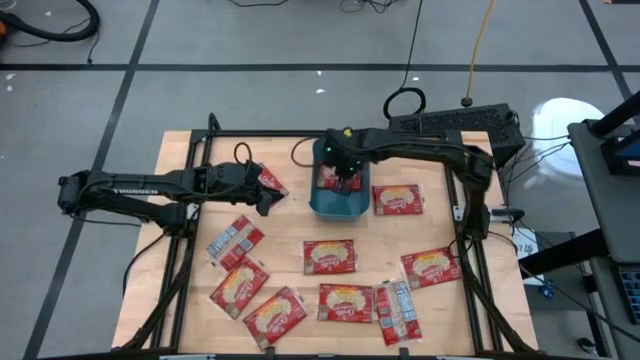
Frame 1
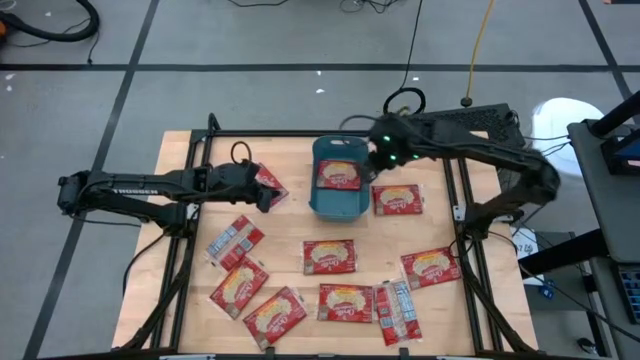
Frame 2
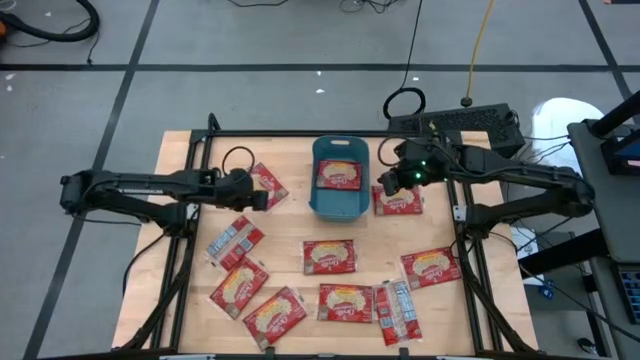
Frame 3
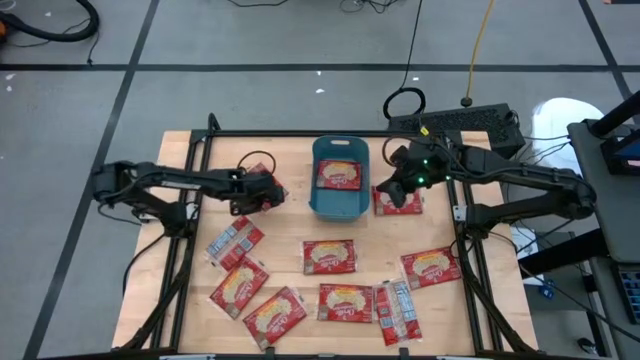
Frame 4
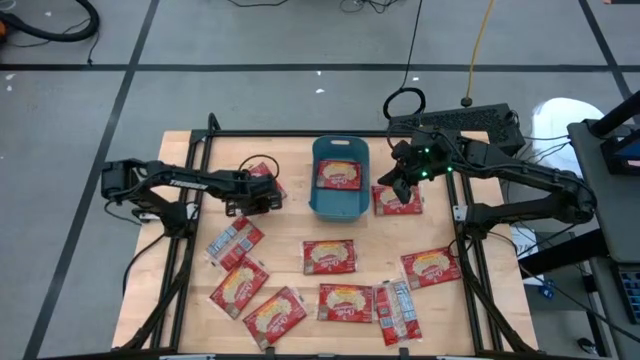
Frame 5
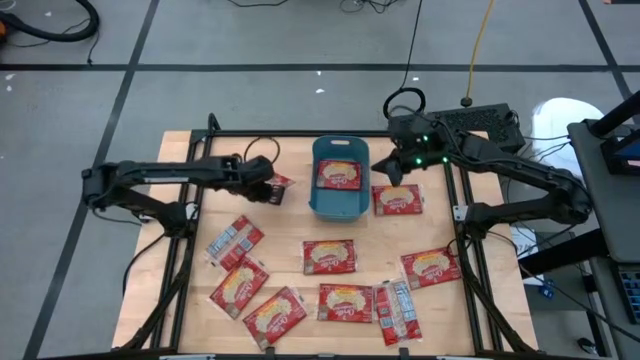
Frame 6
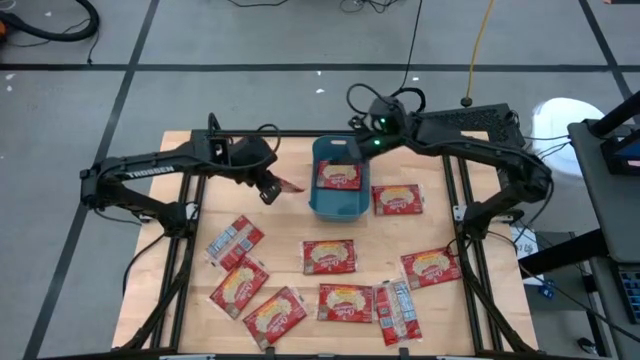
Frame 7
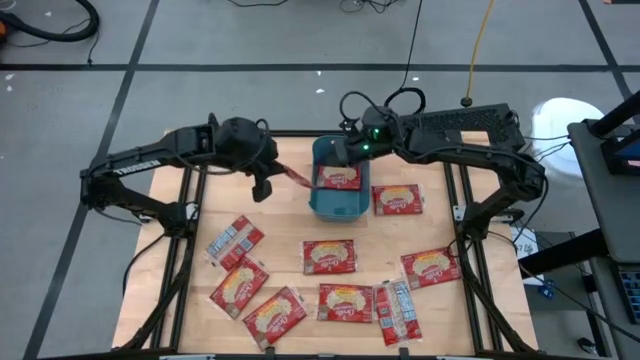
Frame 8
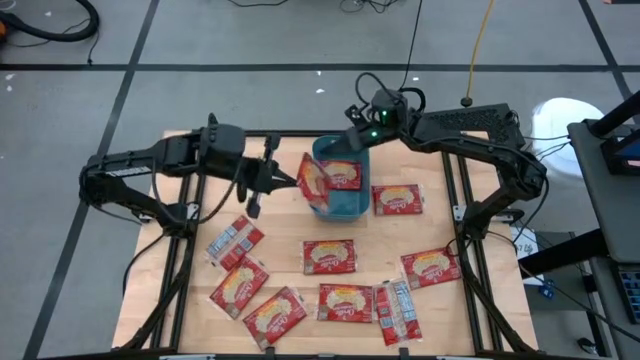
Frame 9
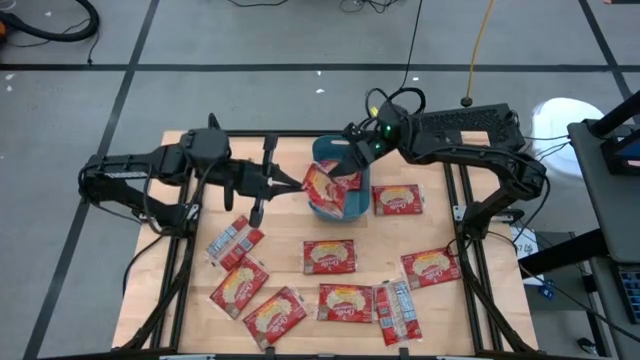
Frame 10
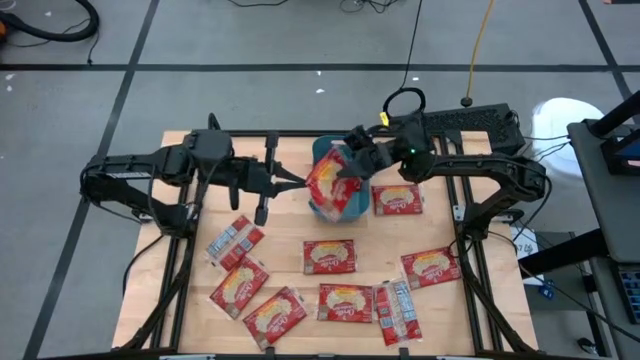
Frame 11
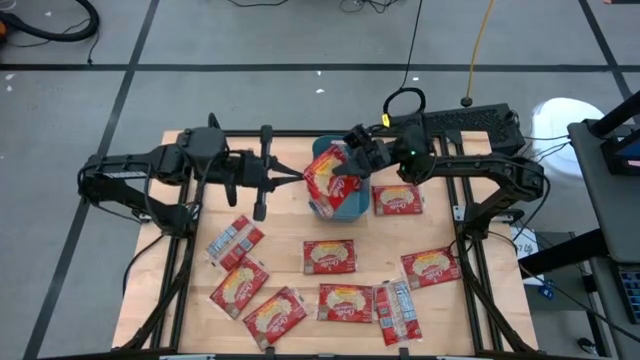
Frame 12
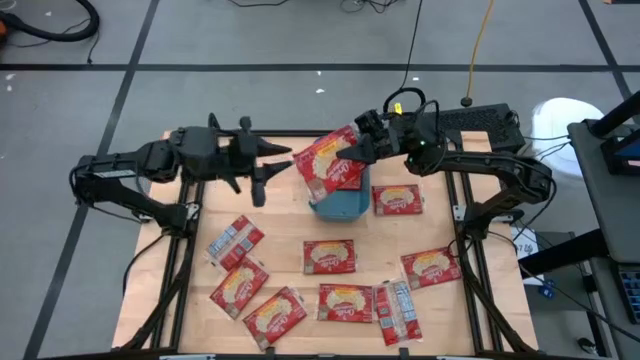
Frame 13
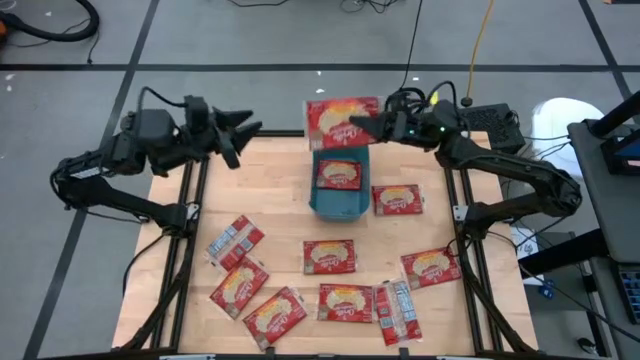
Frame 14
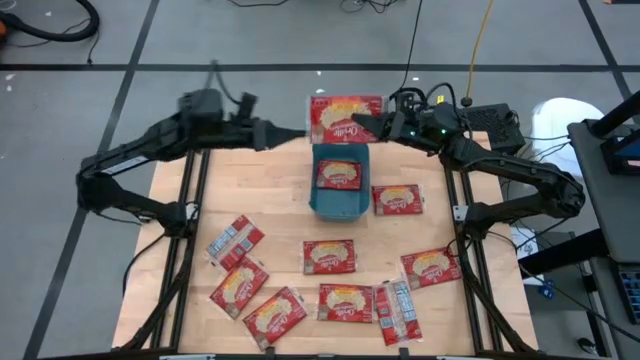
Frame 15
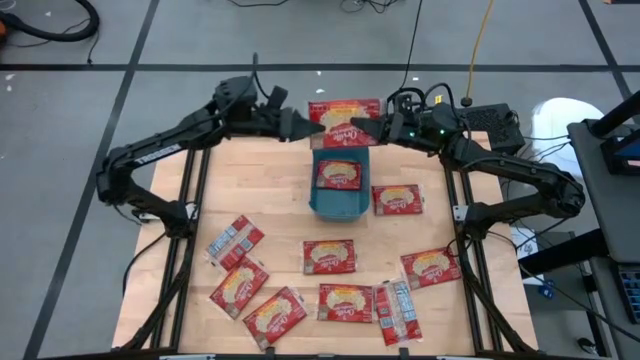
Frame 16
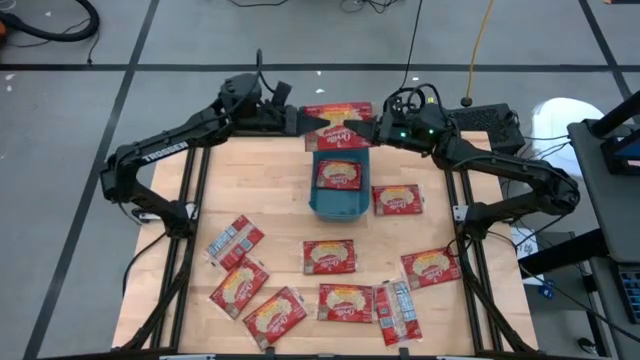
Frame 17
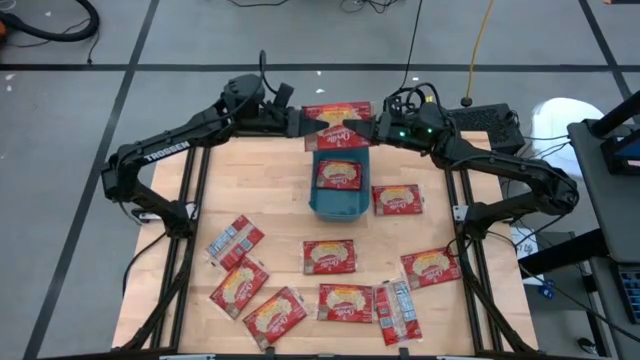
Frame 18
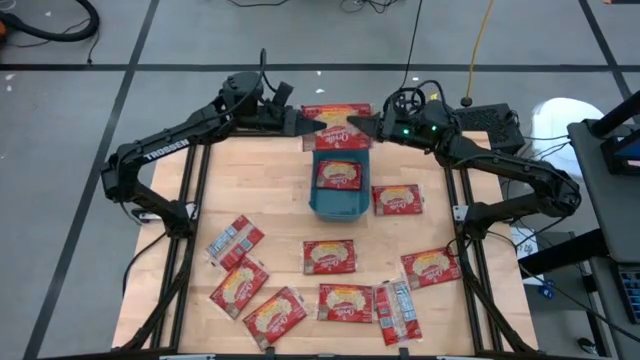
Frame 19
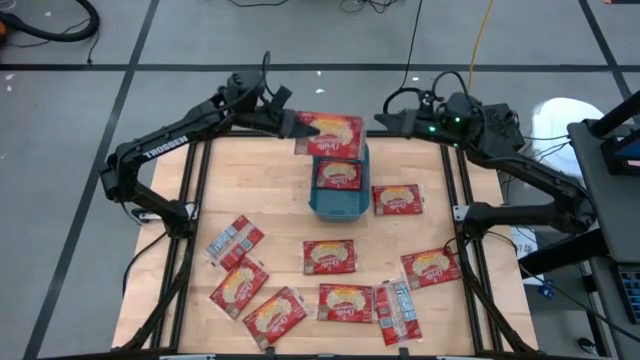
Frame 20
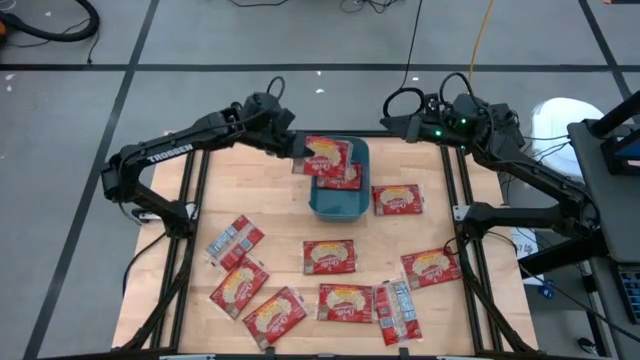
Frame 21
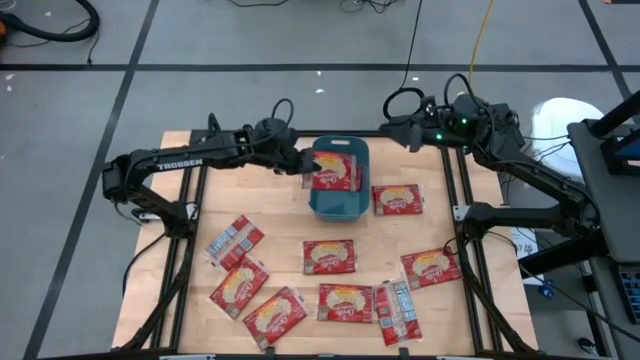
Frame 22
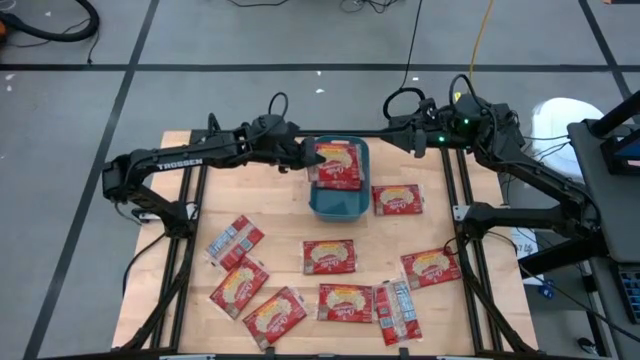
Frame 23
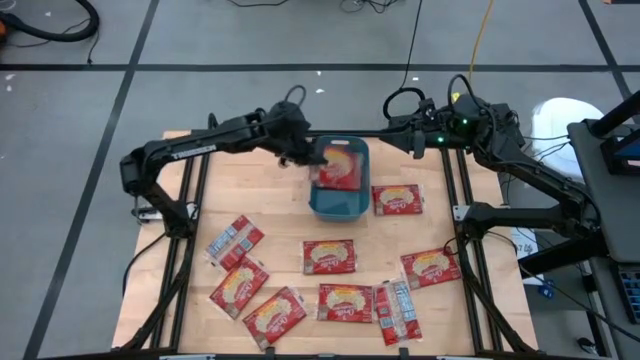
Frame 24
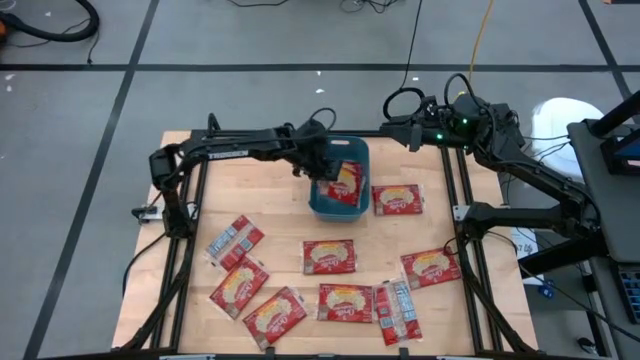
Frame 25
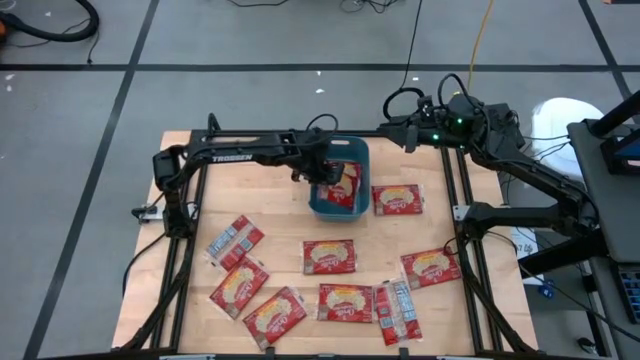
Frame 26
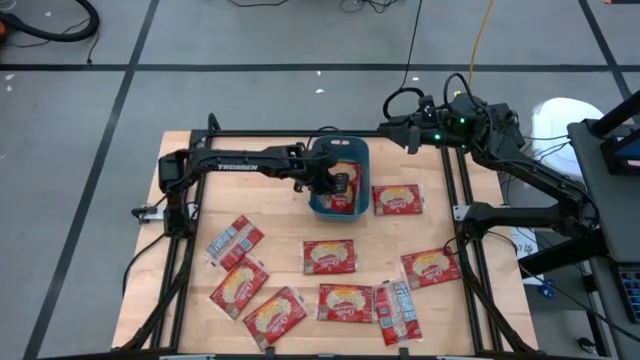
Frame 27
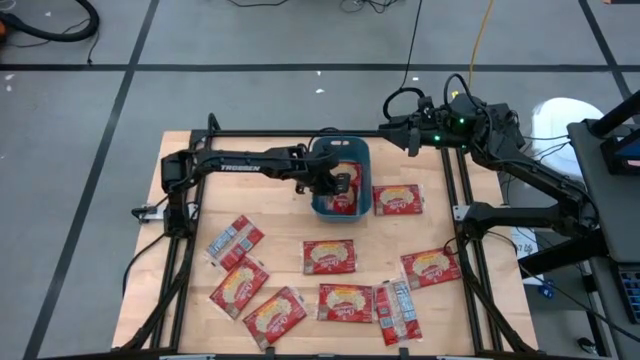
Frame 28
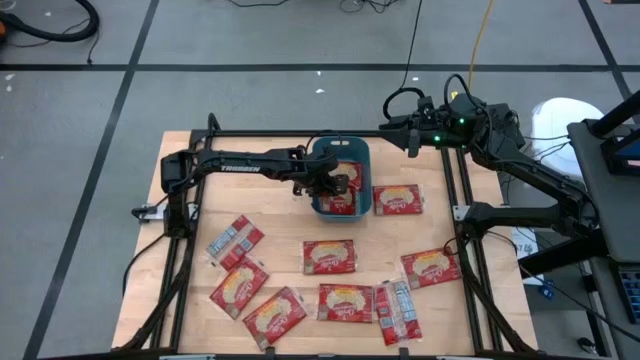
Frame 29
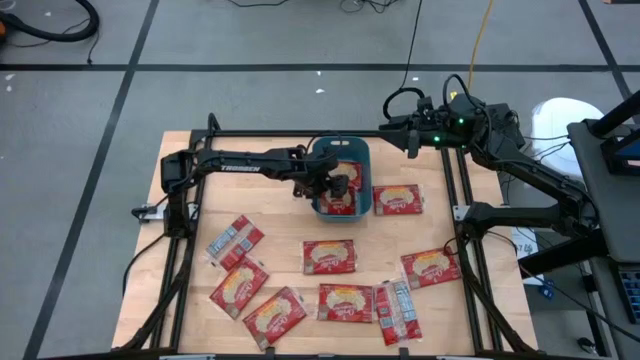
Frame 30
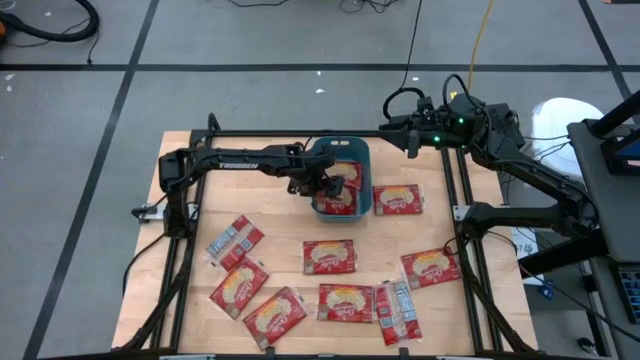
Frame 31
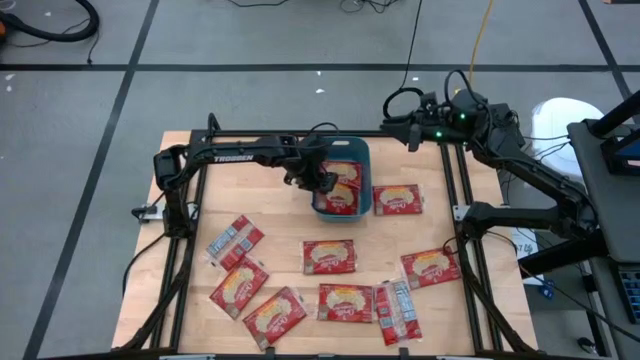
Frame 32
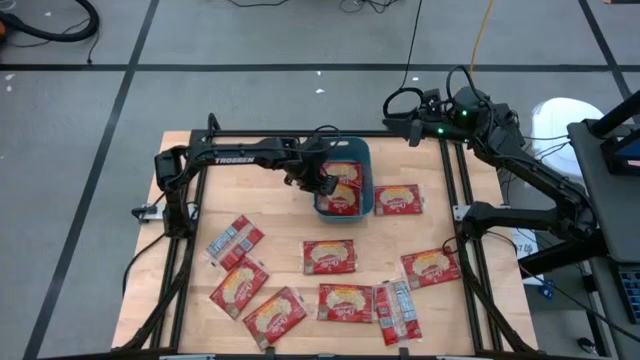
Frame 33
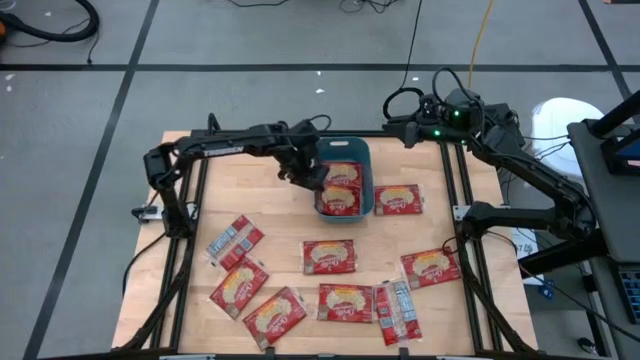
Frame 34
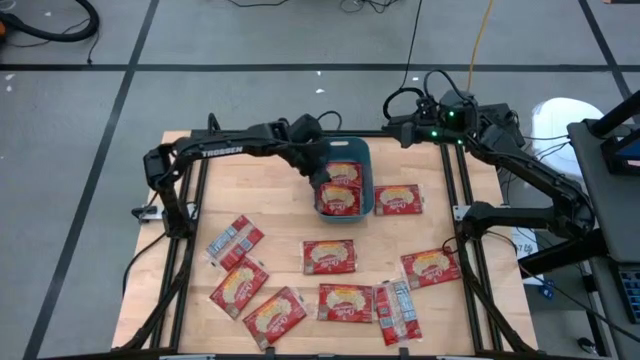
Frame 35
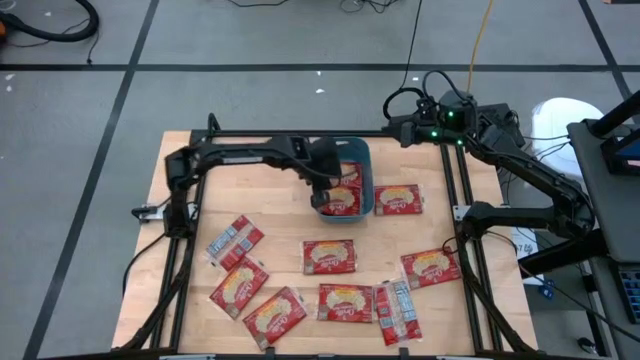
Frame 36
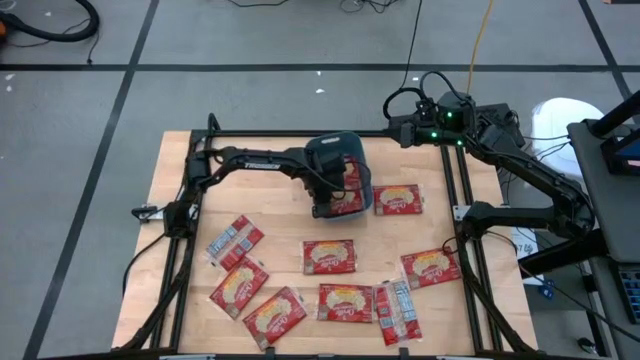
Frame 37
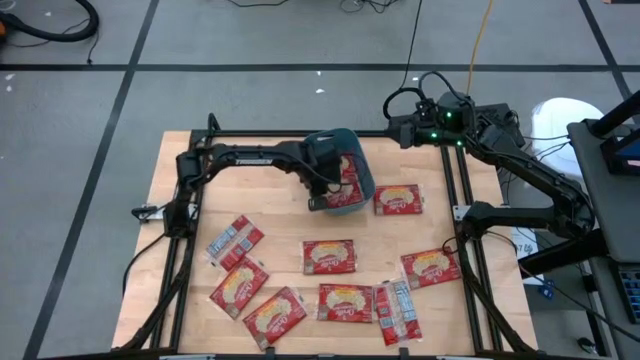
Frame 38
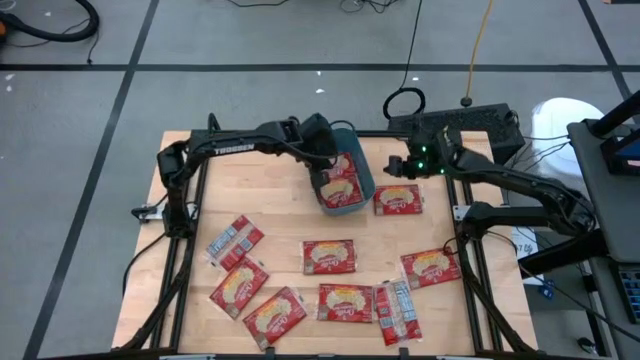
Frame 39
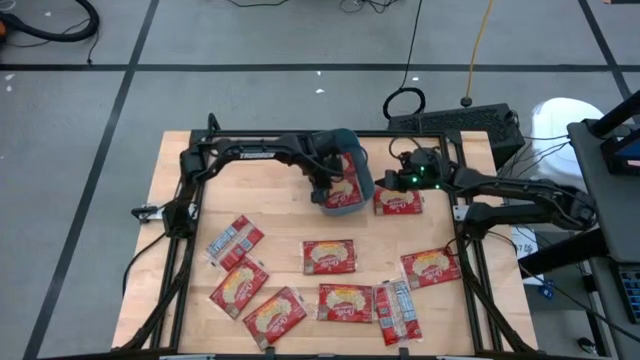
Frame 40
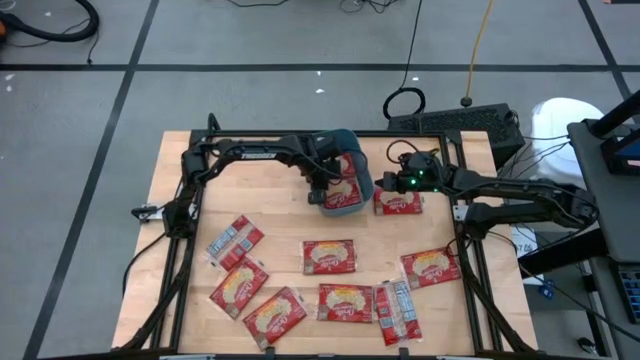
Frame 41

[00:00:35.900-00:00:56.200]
Task: Sort popcorn bags into baskets
Put the red popcorn bag into the blue bin

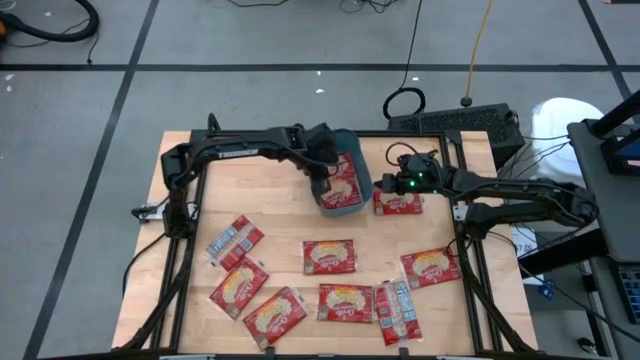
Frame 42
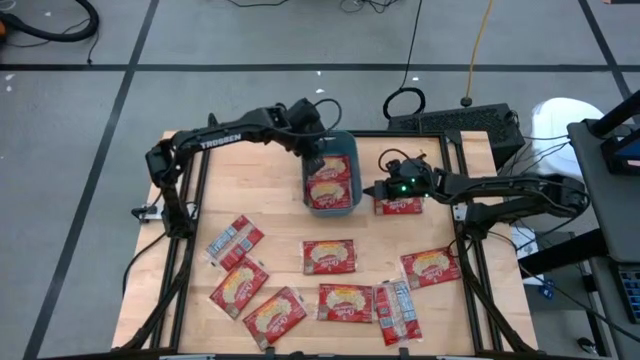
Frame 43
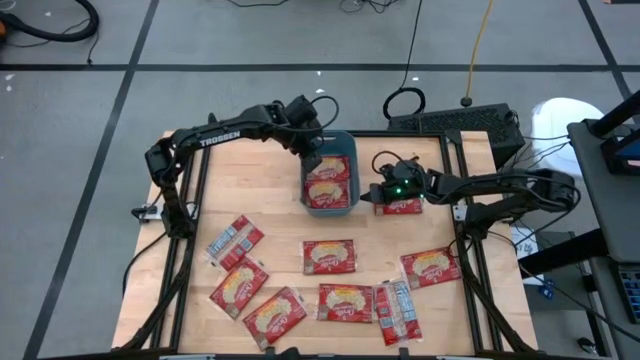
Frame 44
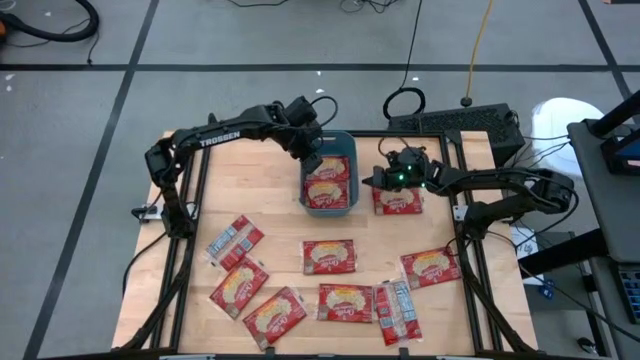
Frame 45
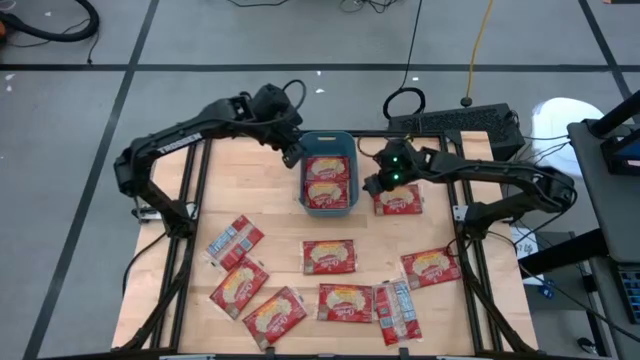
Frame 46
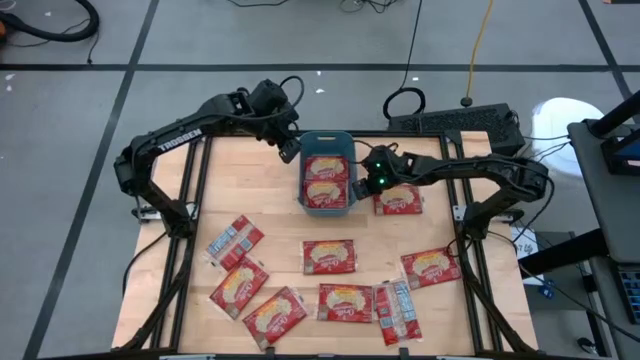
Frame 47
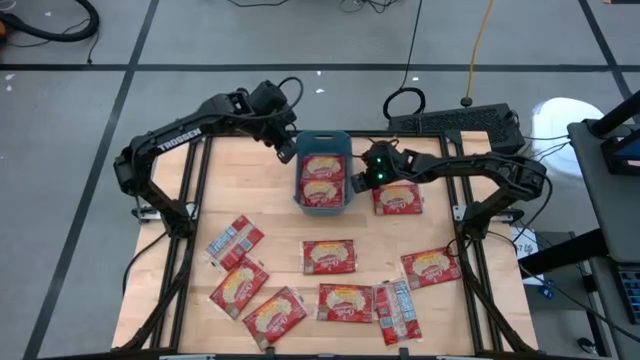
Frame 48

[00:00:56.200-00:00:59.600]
Adjust the blue bin
